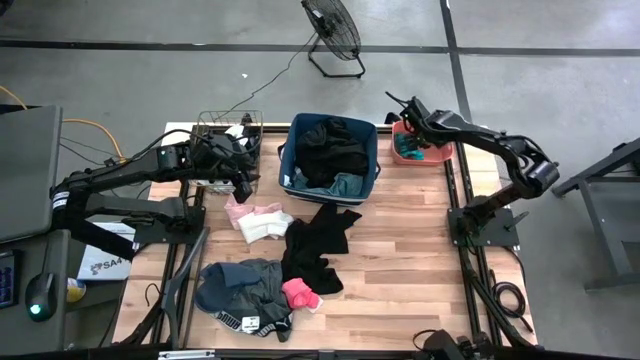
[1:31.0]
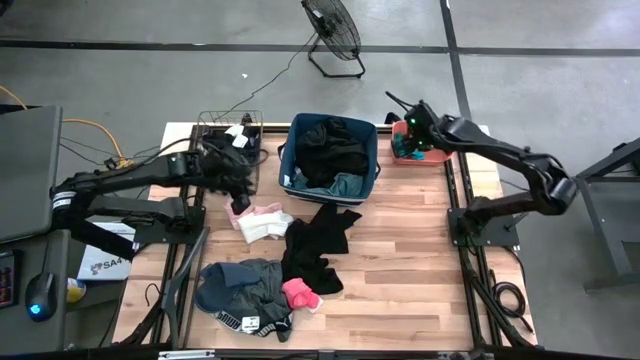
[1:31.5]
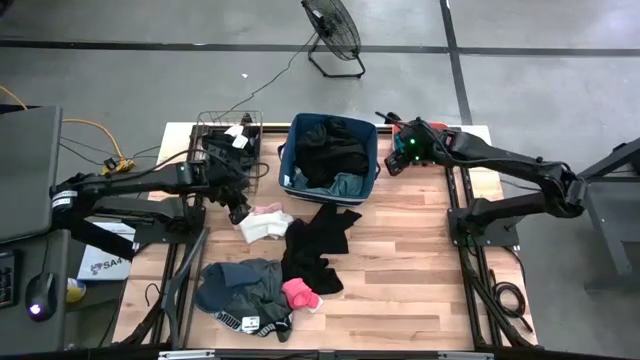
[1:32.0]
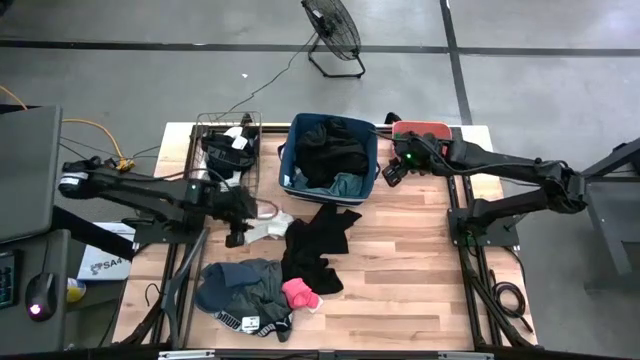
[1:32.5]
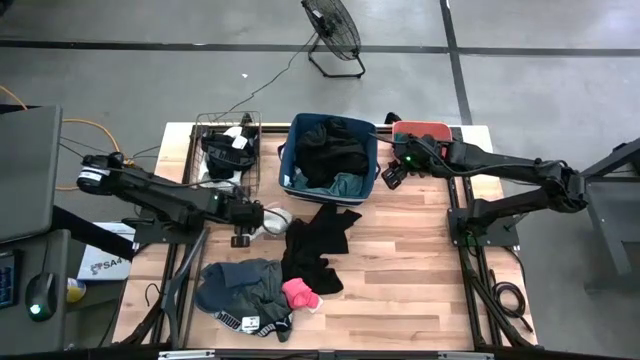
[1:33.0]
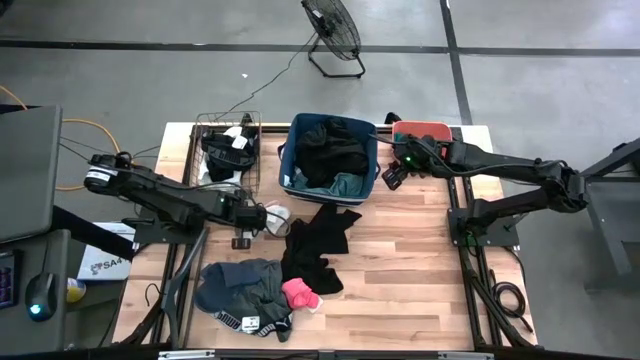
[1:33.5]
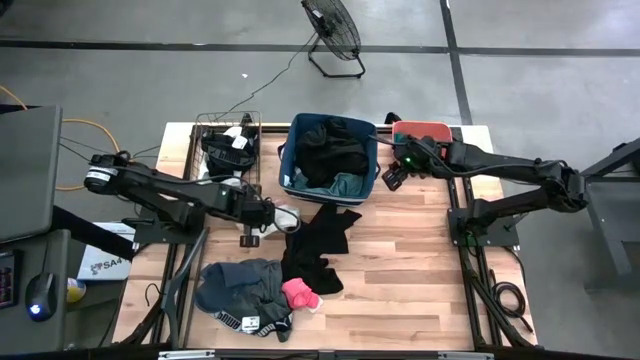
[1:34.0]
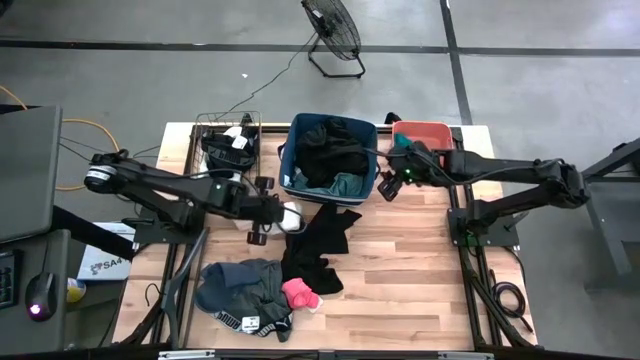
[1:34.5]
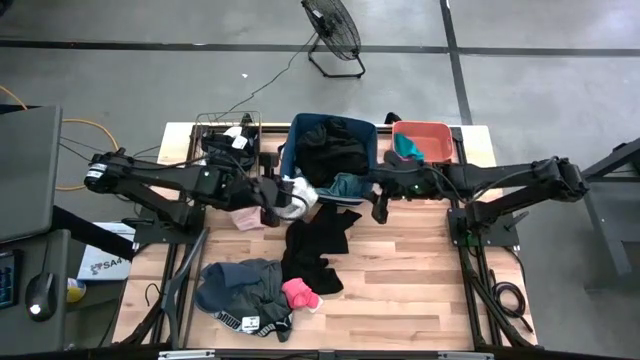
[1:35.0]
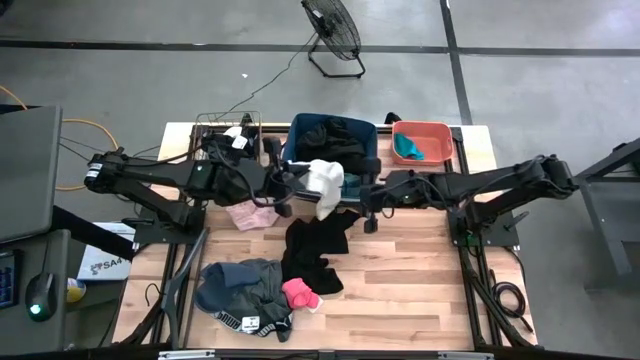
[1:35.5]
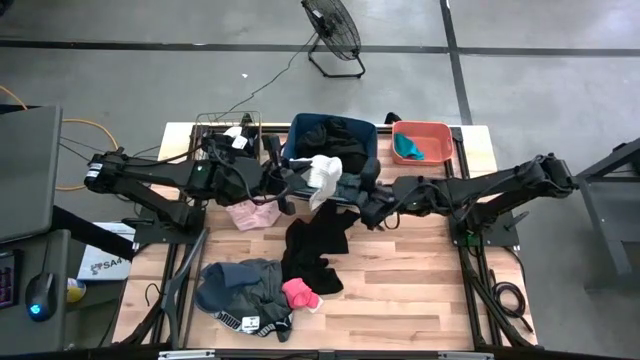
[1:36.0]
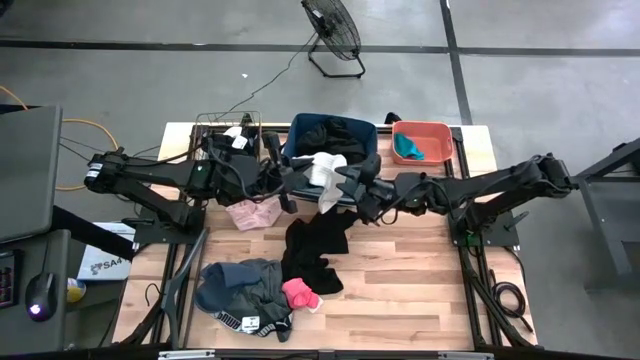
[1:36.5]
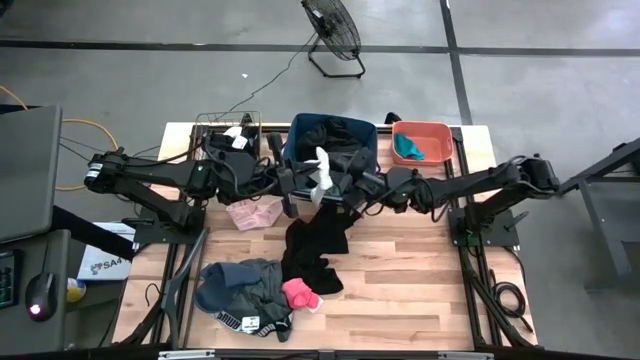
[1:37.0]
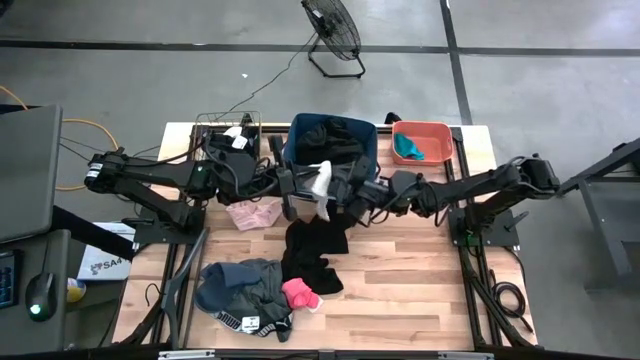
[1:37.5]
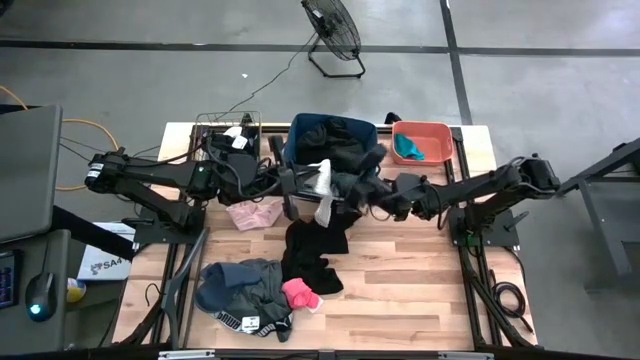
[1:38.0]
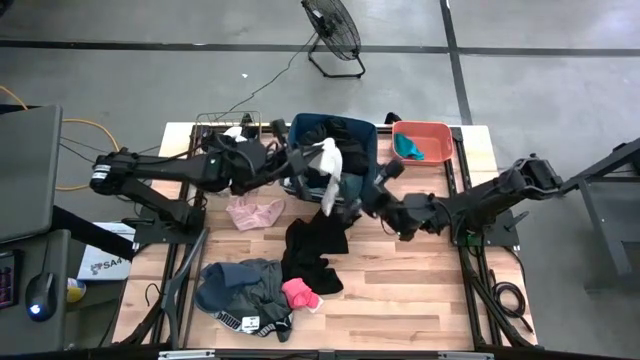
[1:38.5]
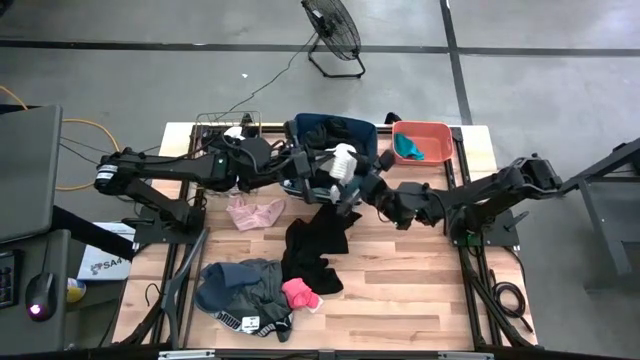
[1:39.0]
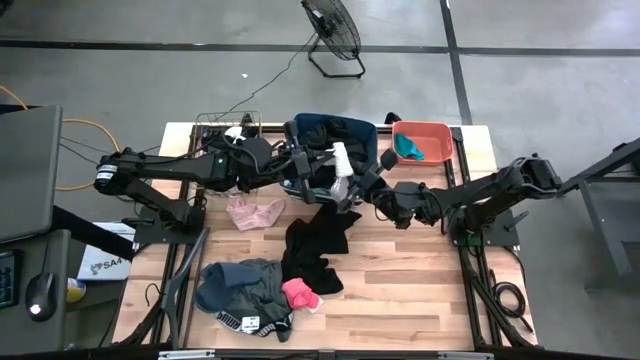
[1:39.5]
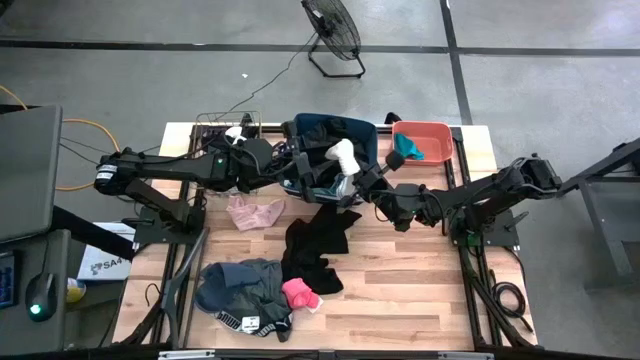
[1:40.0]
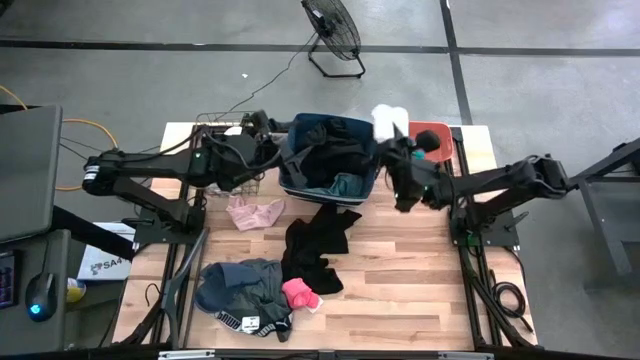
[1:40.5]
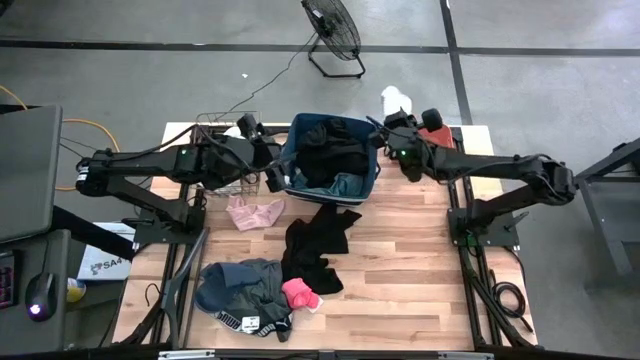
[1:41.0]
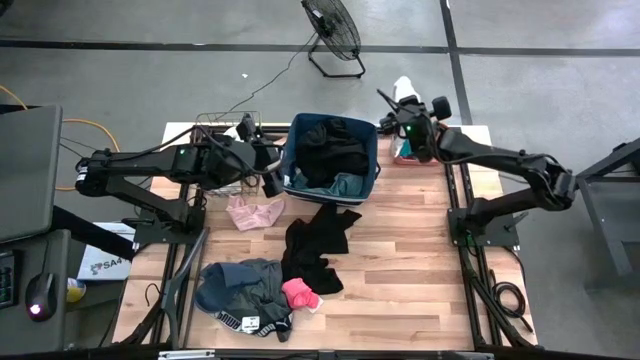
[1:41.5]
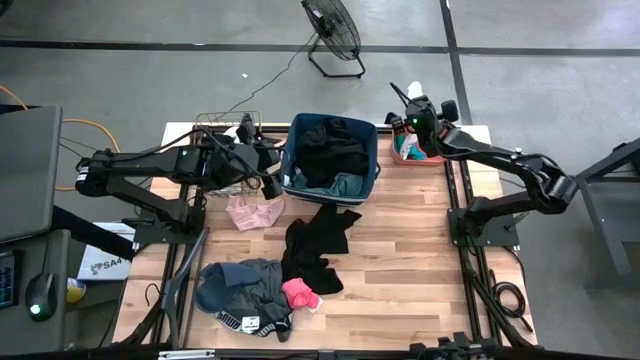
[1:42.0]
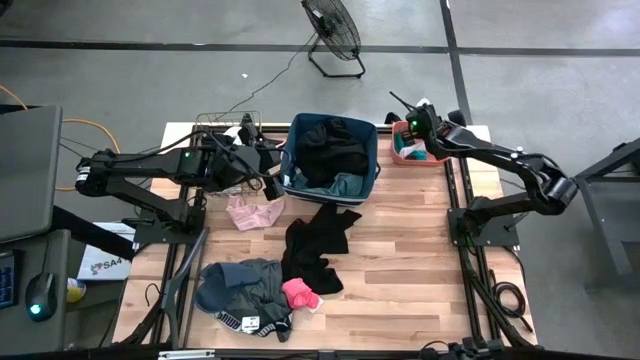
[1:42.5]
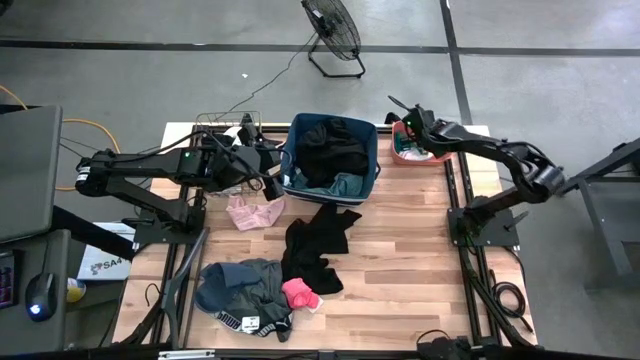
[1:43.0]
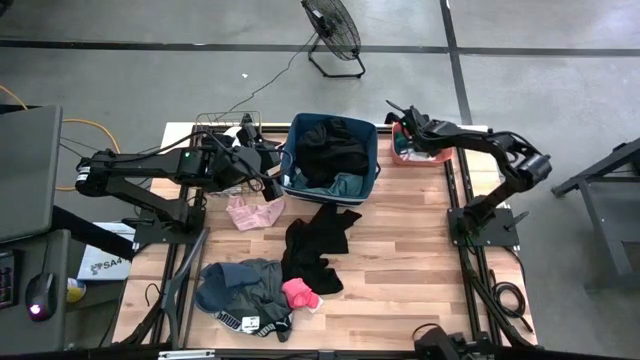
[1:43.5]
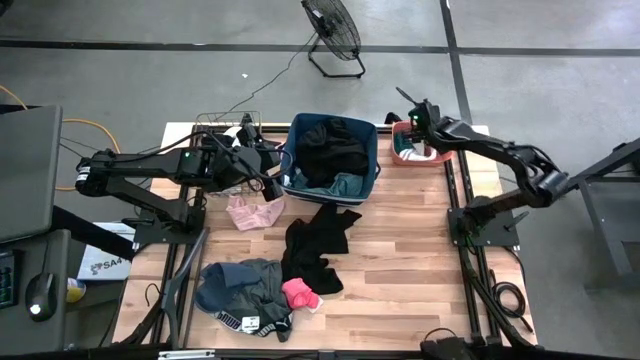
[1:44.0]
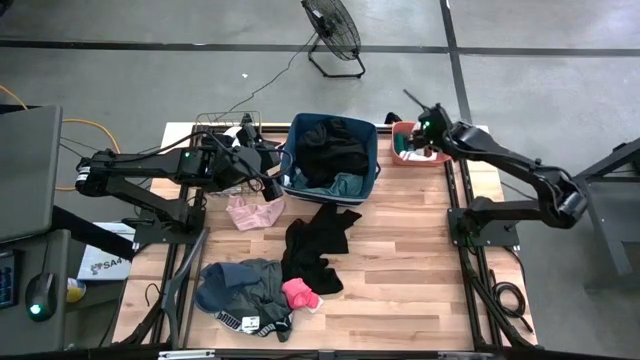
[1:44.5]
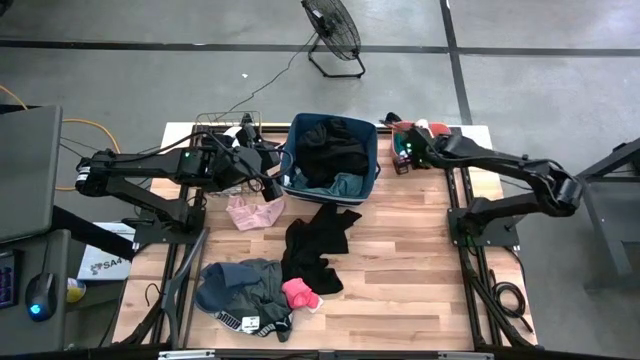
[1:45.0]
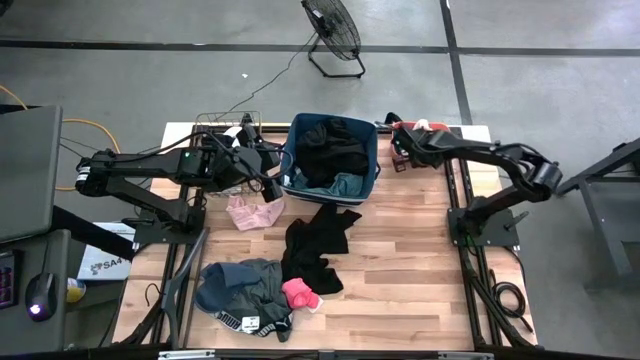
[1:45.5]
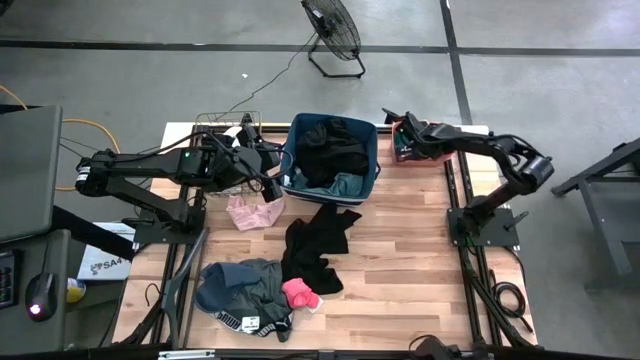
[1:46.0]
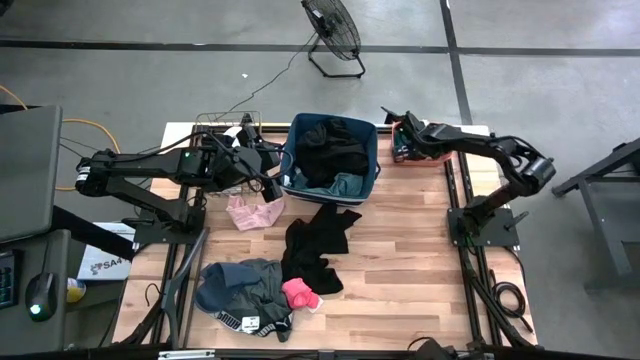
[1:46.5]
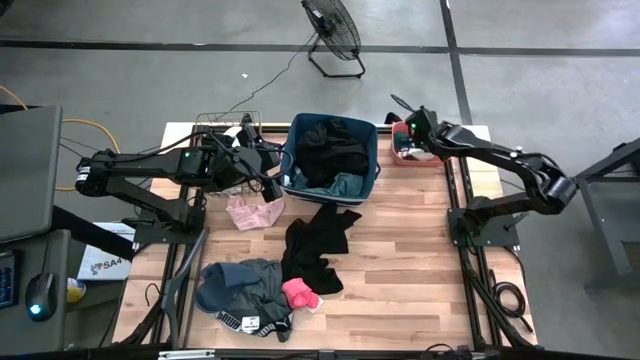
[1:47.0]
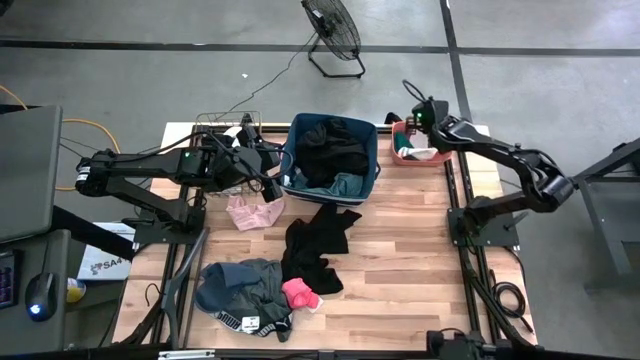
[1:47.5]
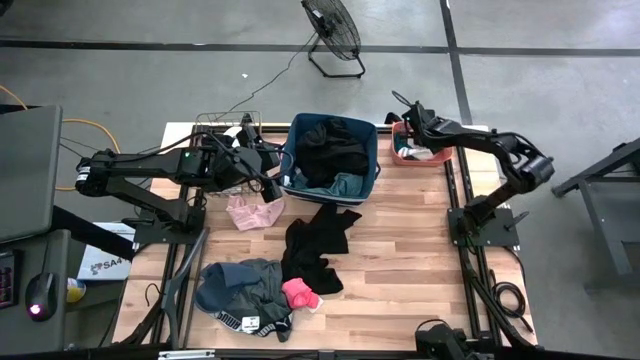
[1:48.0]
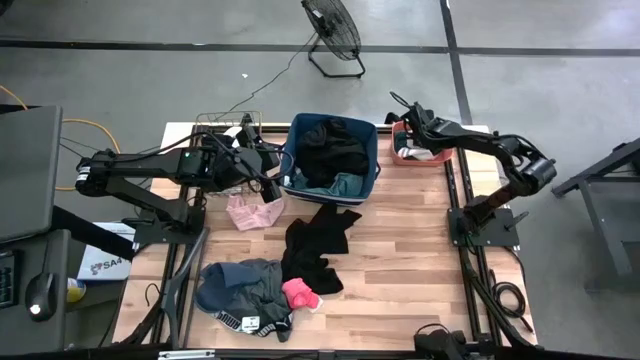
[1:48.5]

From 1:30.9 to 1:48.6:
Task: Pick & Place Cloths
Put the white sock into the orange bin

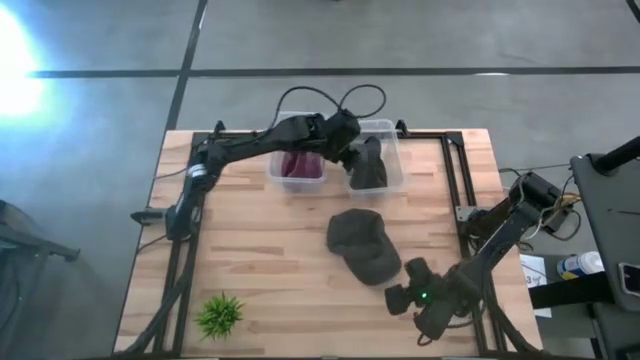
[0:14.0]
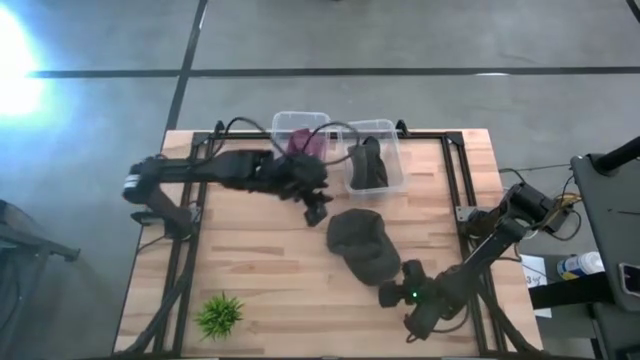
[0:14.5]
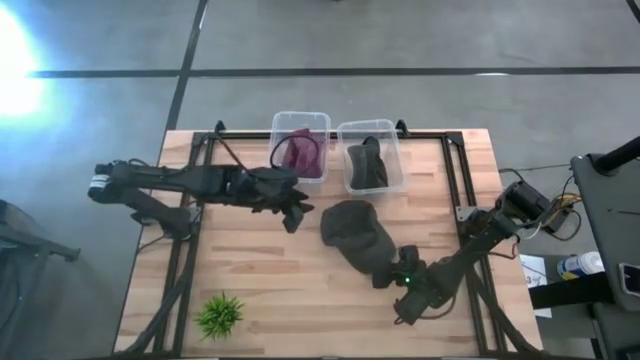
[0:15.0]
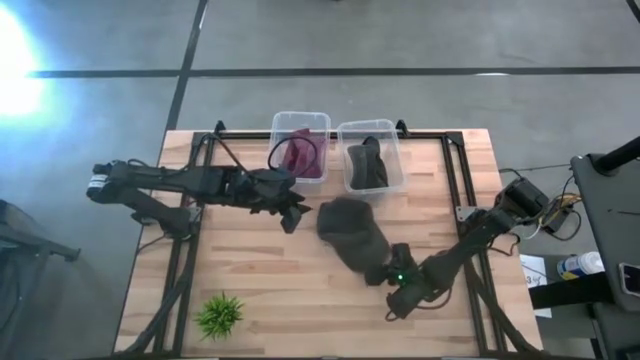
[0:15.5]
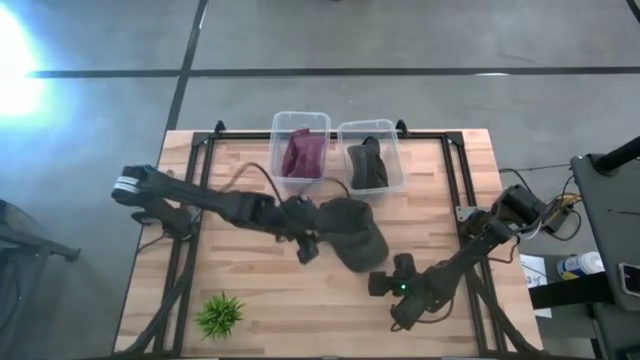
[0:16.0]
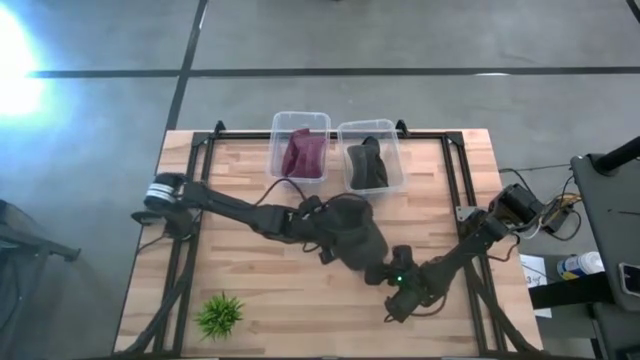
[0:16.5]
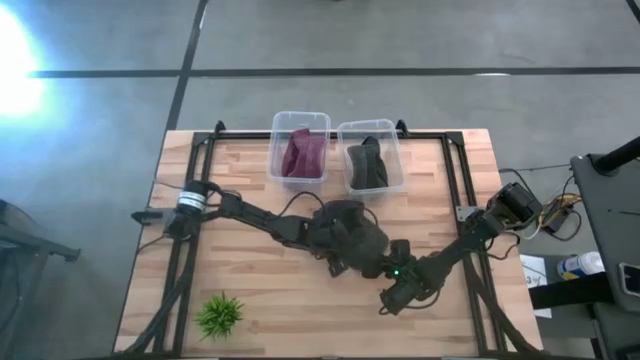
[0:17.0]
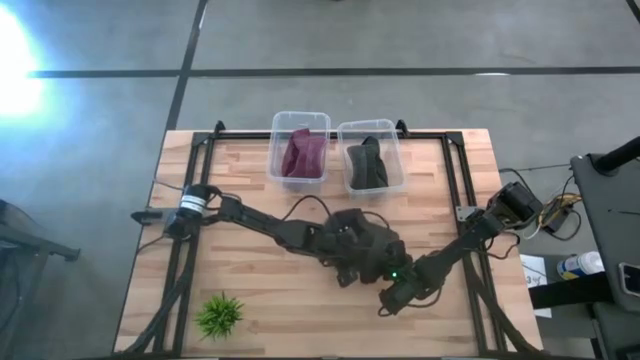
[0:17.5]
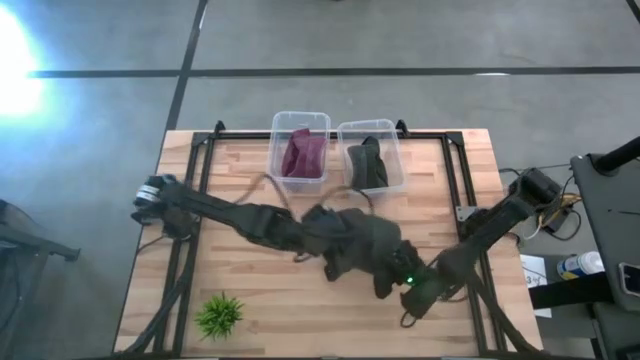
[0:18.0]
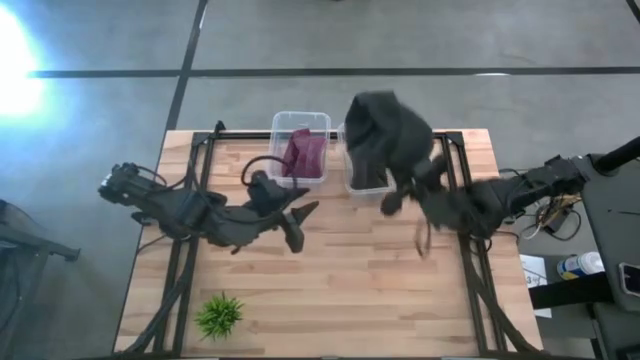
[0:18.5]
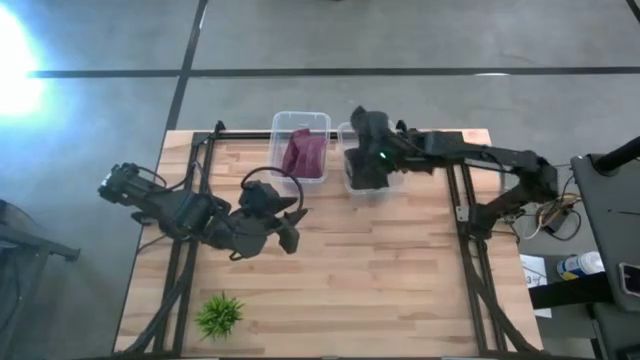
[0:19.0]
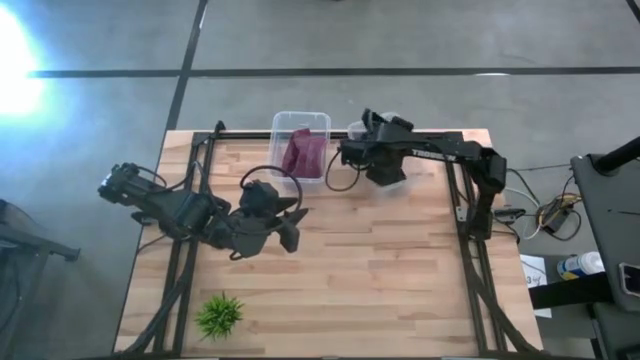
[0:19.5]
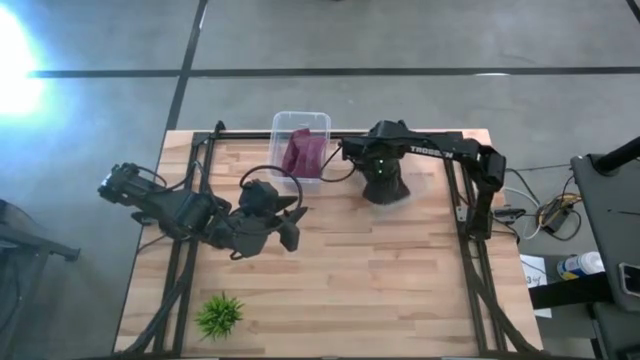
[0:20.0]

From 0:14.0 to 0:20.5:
Task: Pick & Place hat
Put the black cap into the right transparent bin
